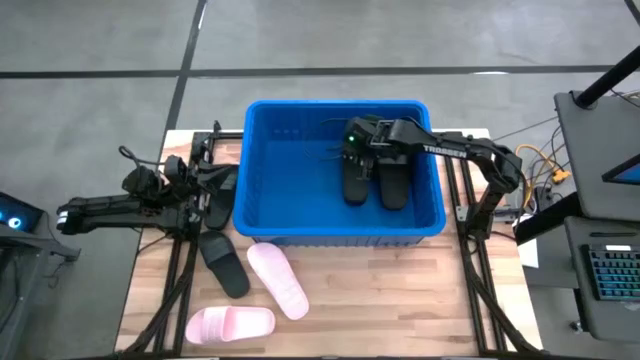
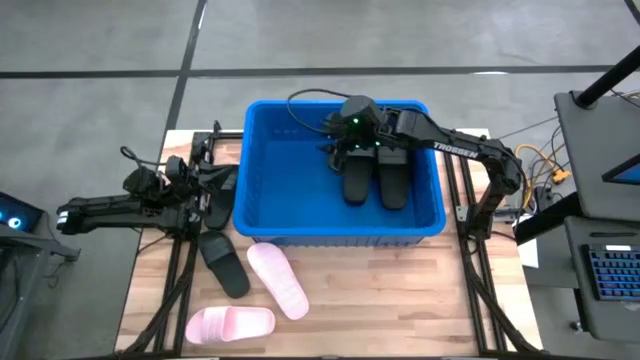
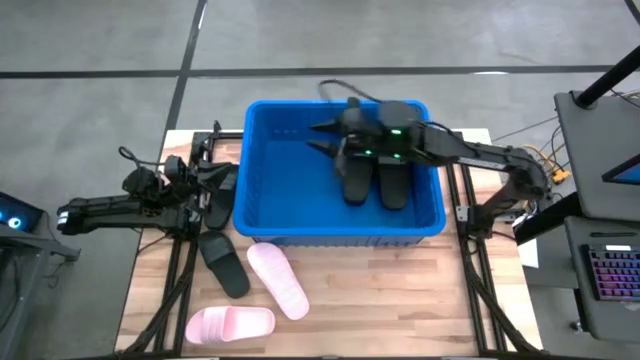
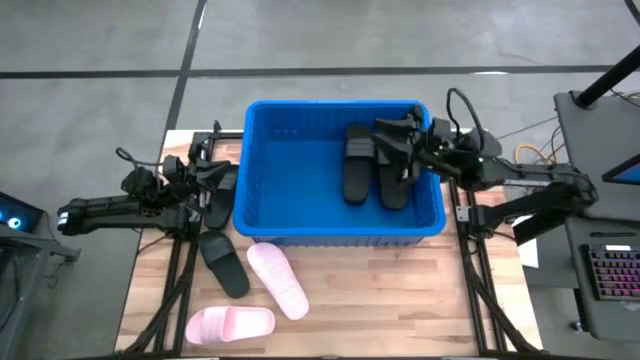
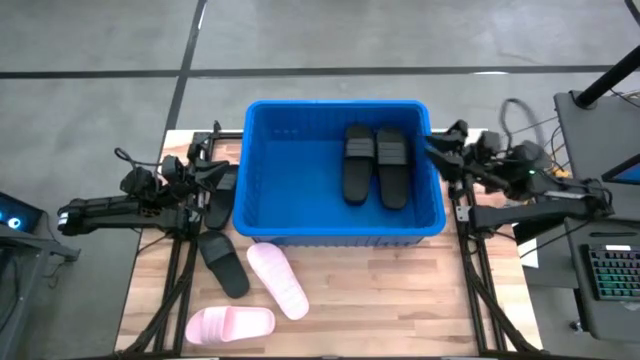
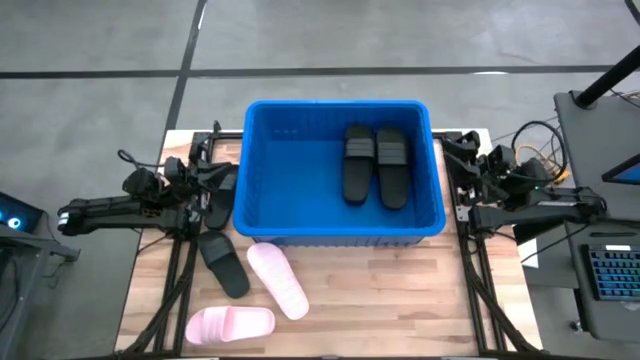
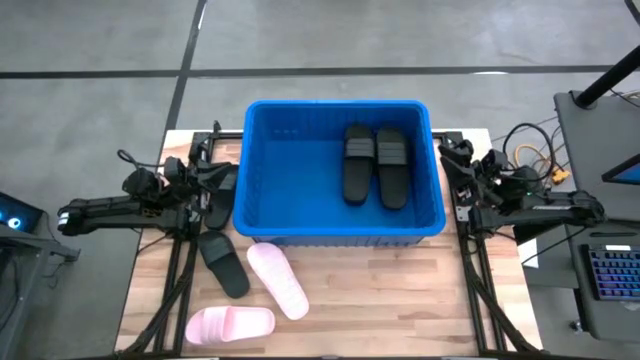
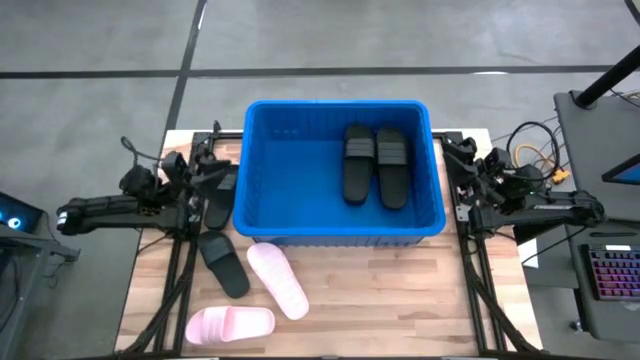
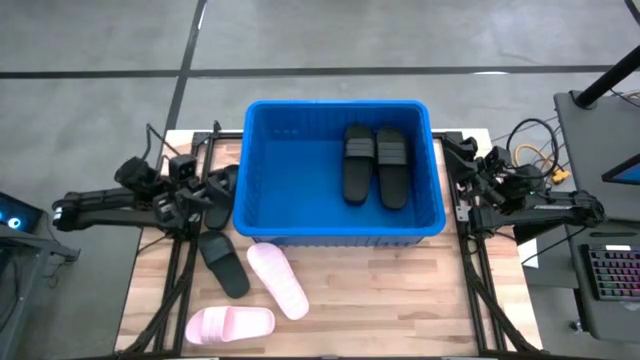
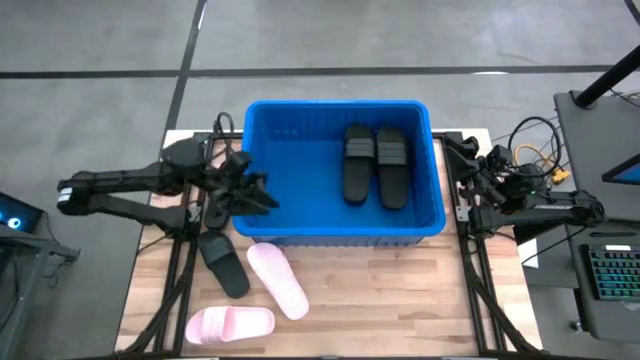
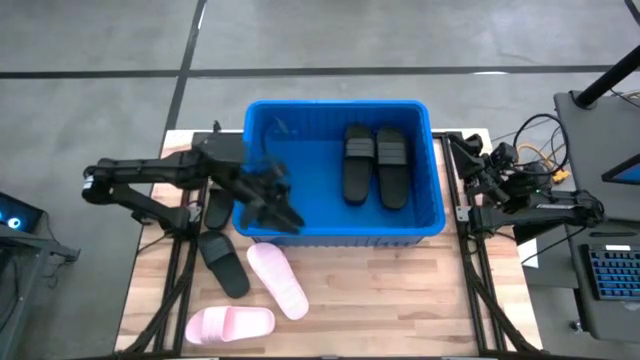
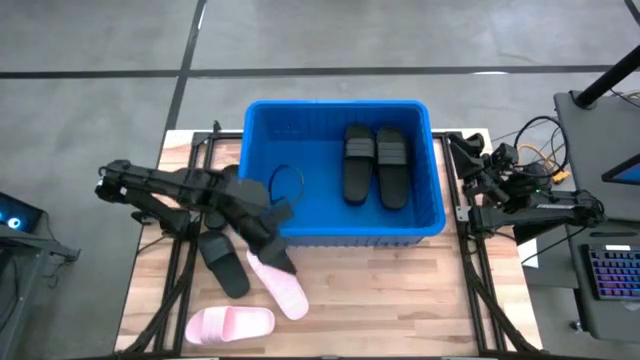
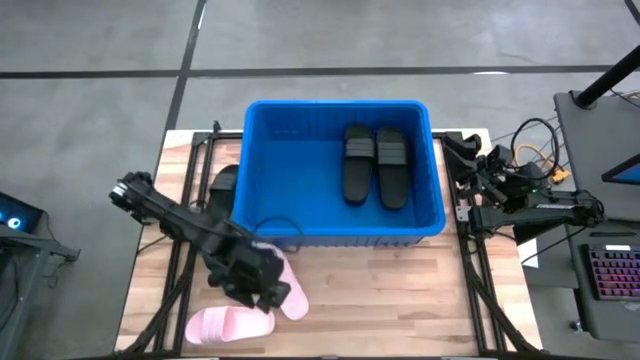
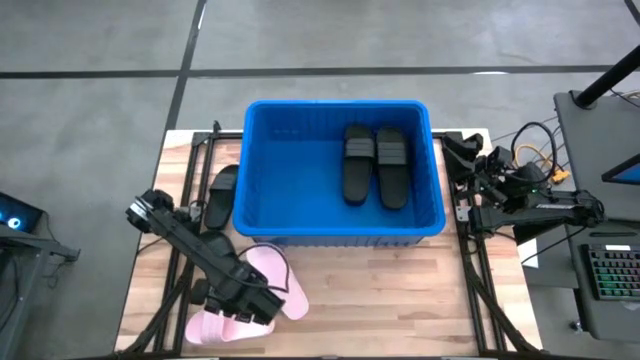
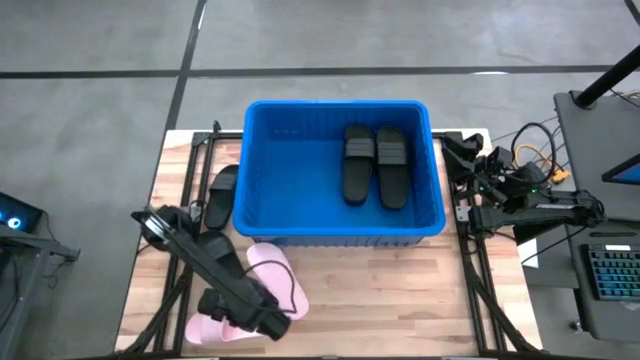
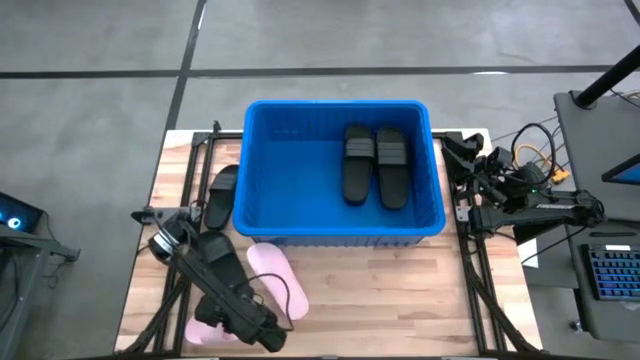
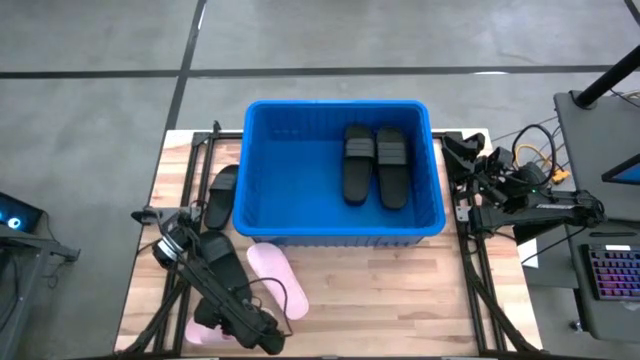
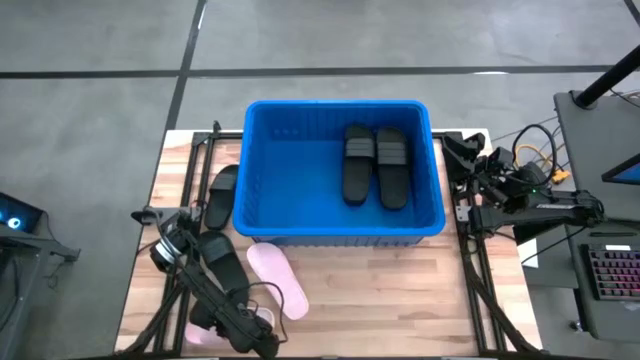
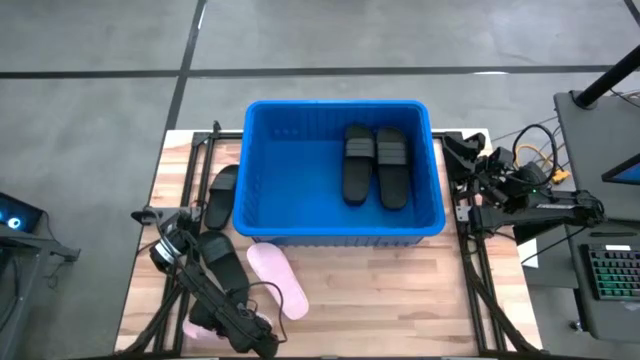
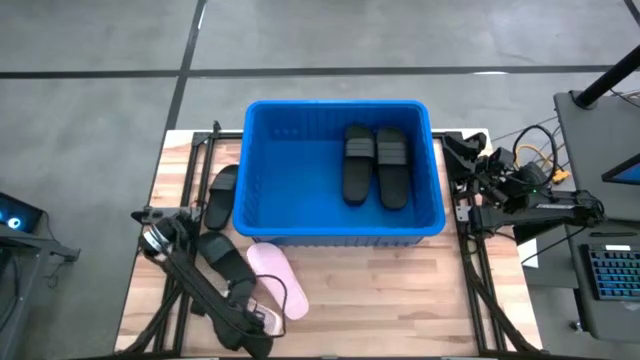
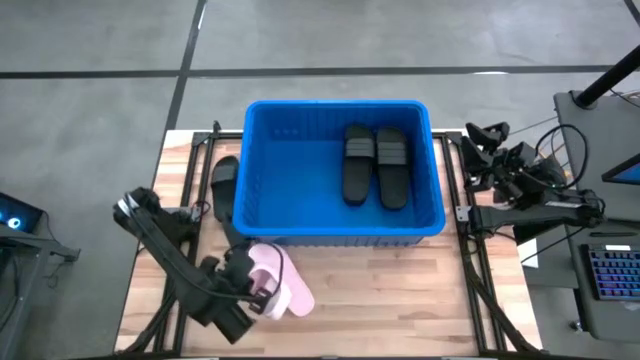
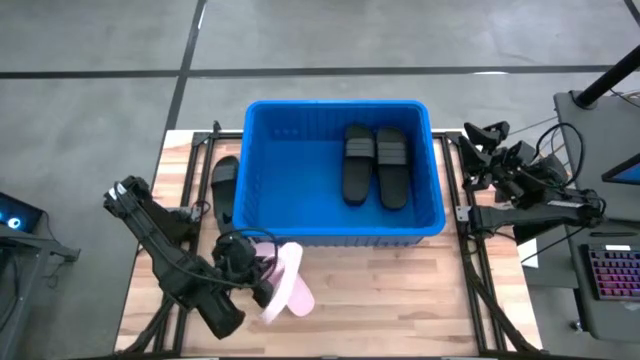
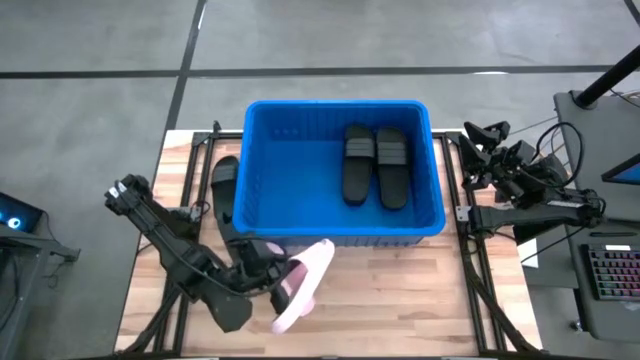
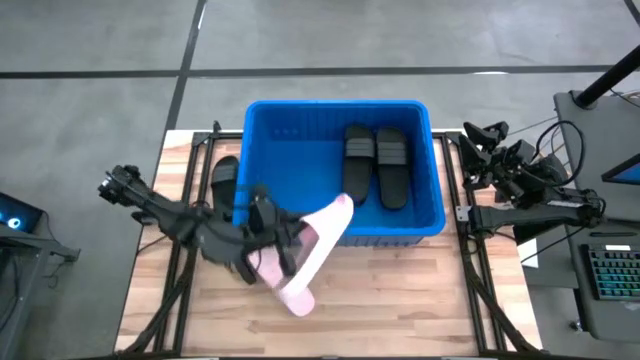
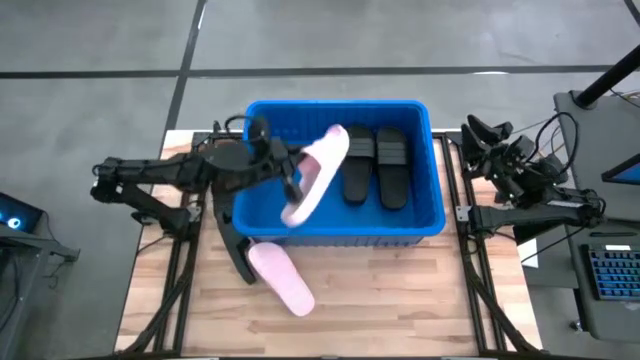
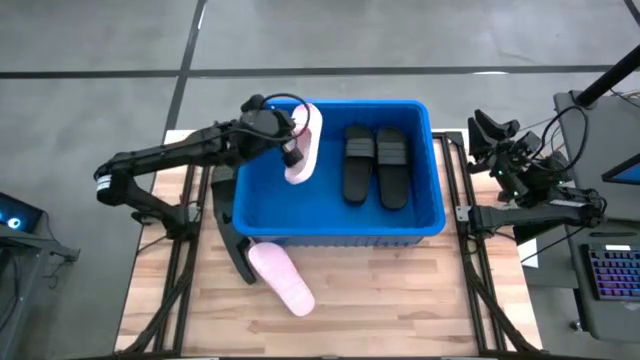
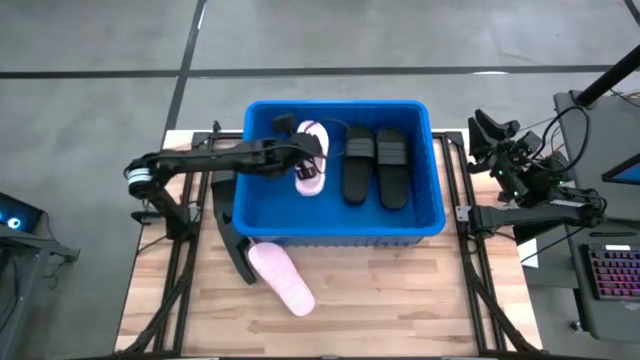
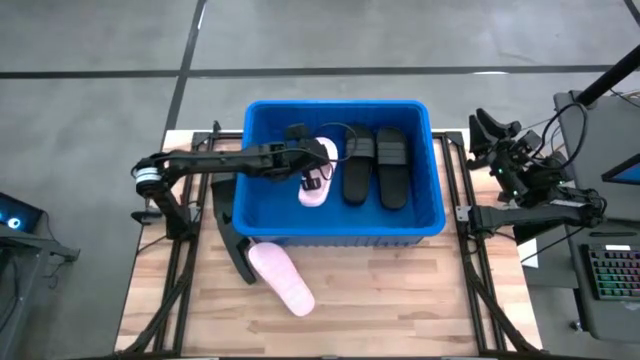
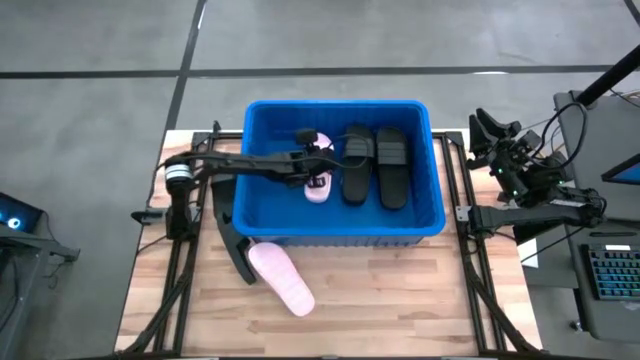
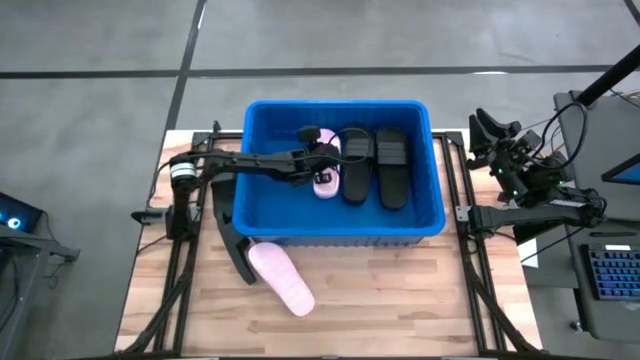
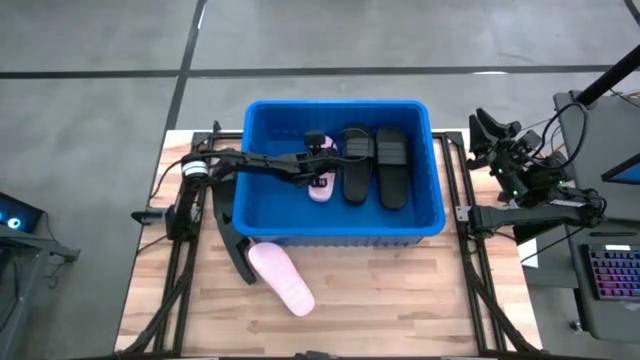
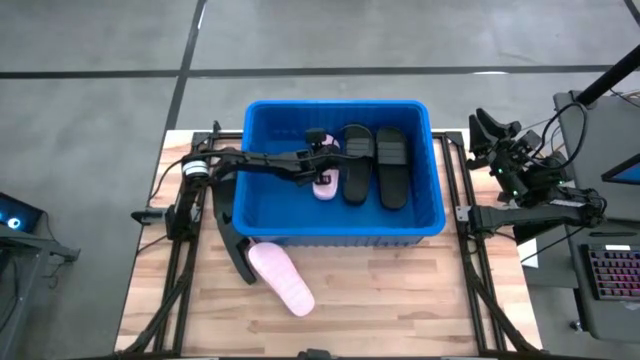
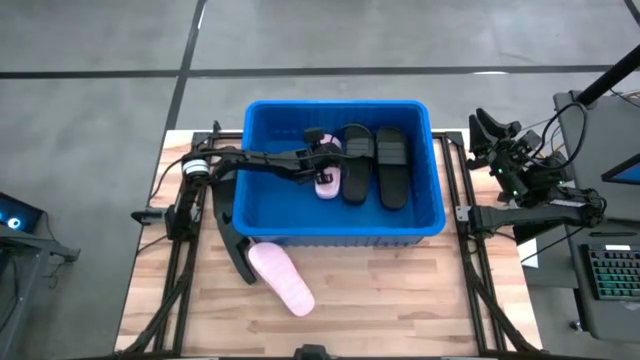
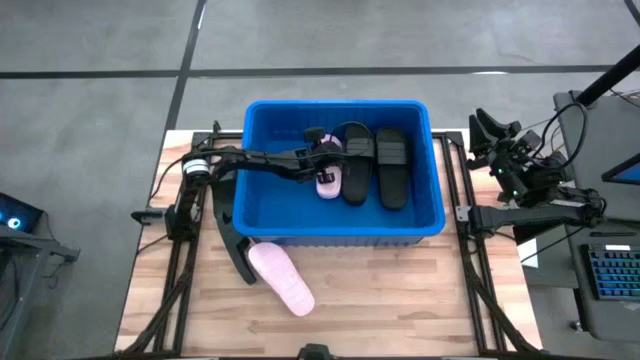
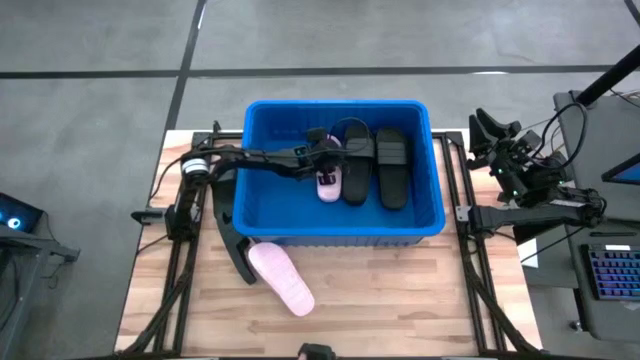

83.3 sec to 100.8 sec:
Task: Pick and place slides into bin
Put the pink slide into the blue bin

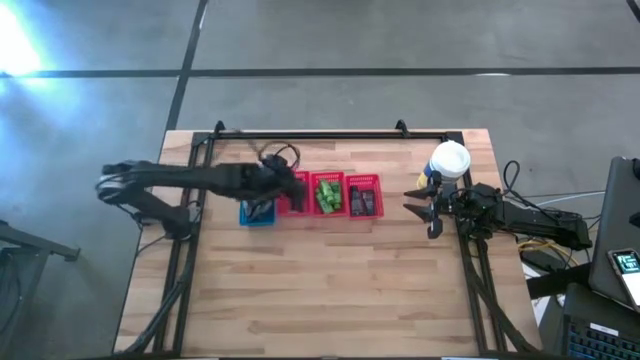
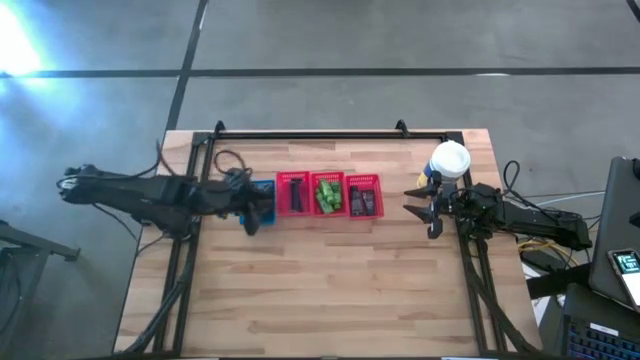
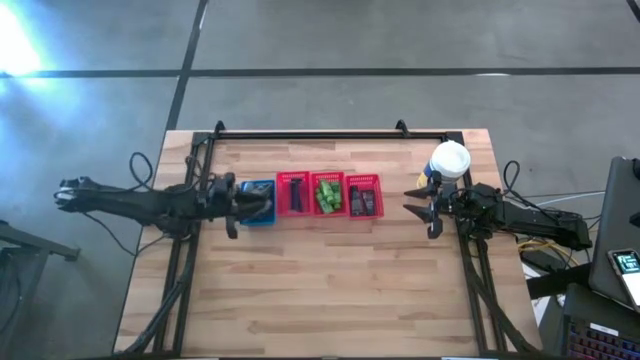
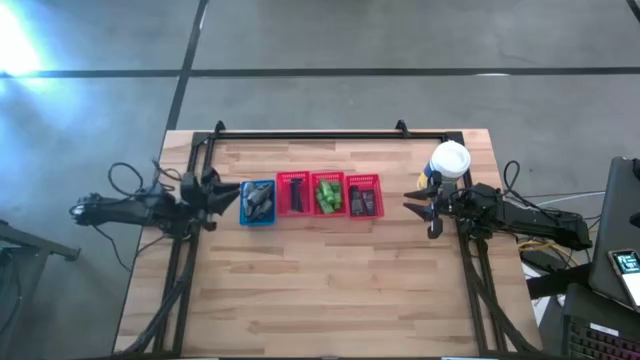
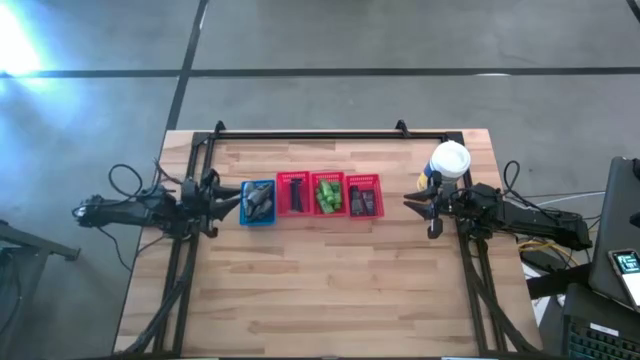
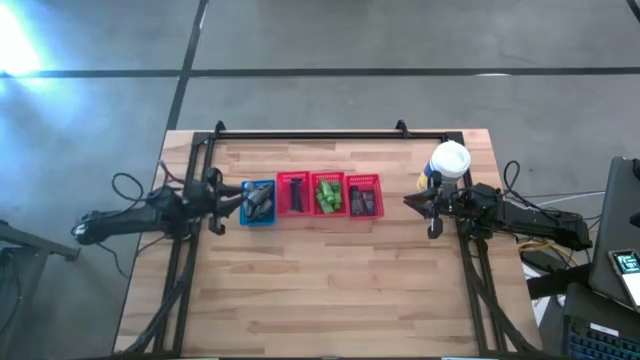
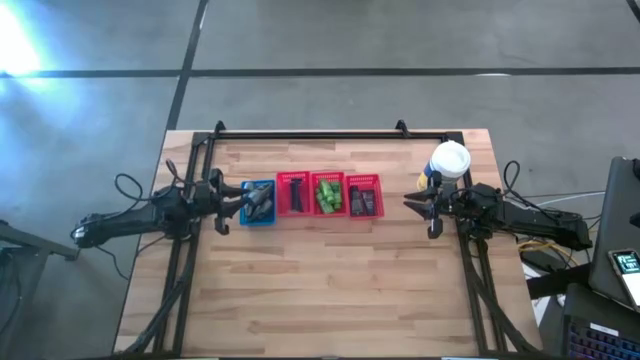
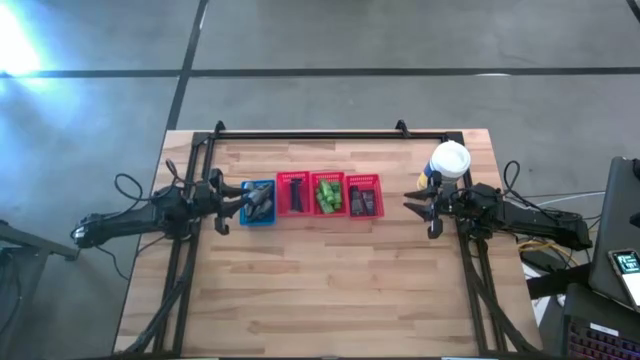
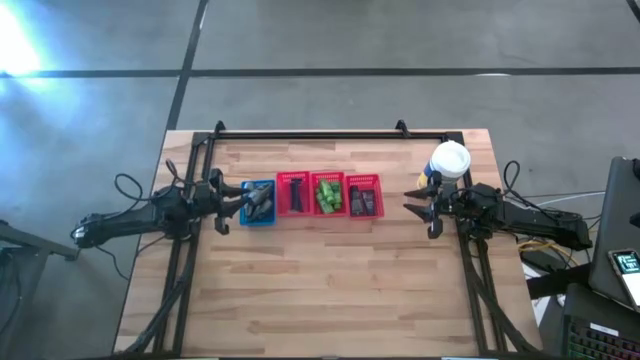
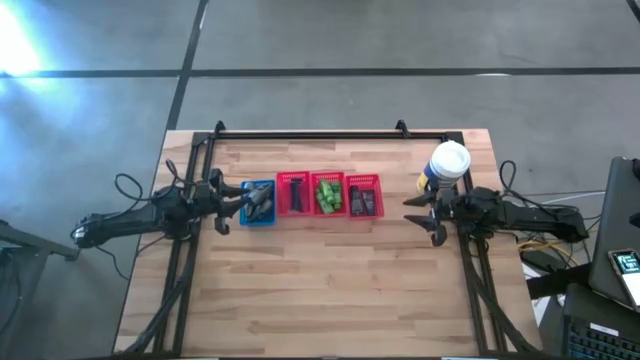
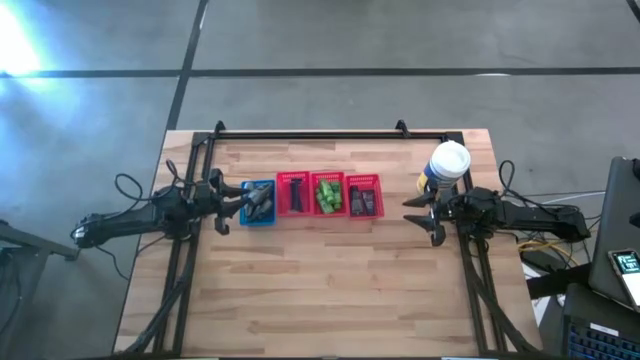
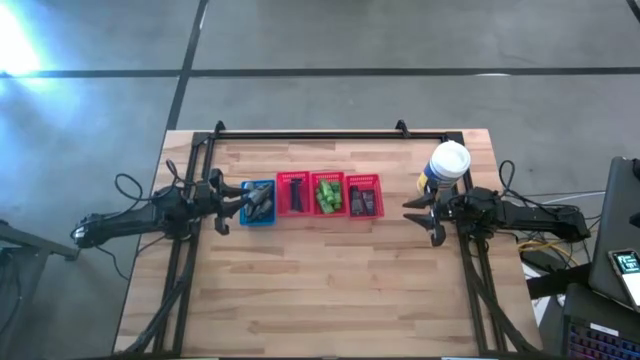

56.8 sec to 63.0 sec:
Task: Pick & Place Travel size toiletries
Return to Home Position
